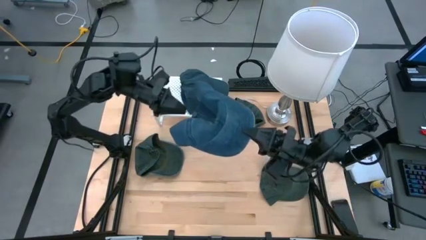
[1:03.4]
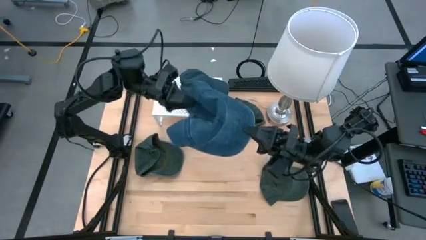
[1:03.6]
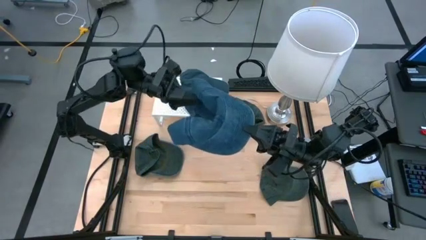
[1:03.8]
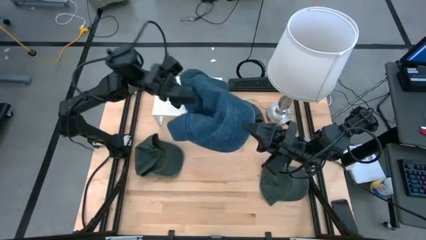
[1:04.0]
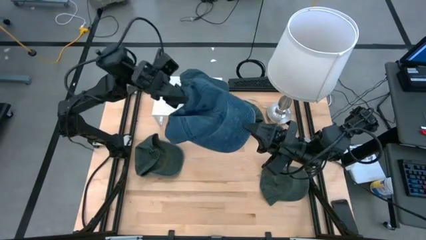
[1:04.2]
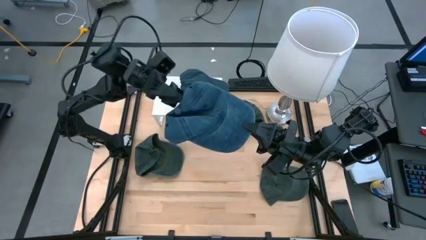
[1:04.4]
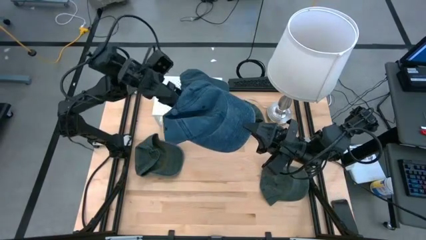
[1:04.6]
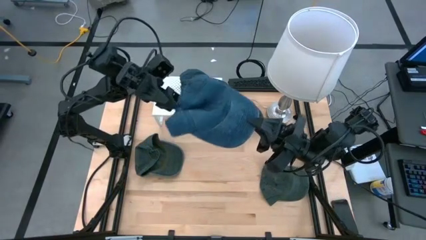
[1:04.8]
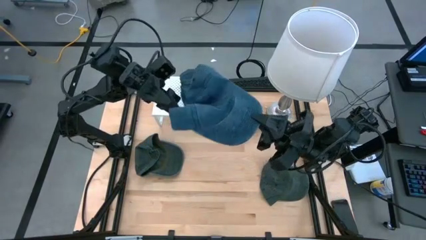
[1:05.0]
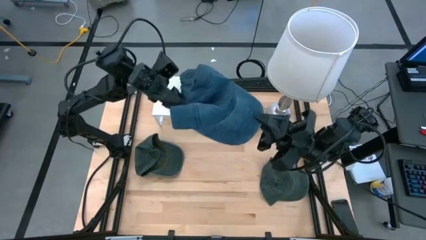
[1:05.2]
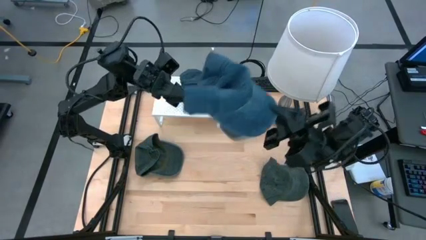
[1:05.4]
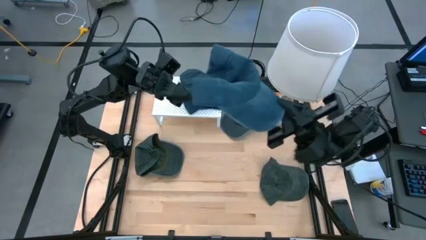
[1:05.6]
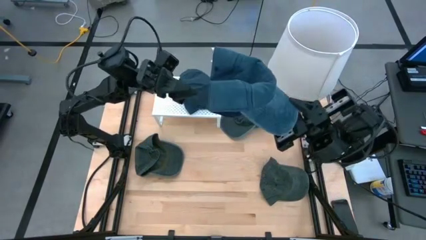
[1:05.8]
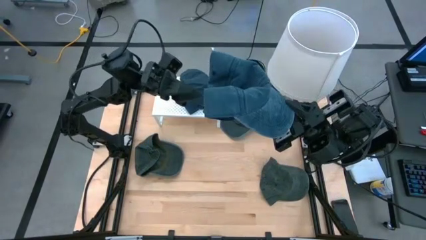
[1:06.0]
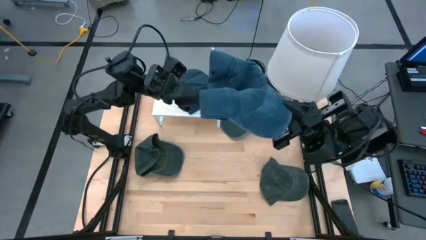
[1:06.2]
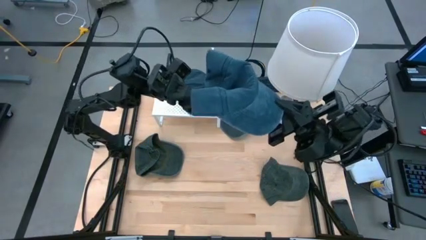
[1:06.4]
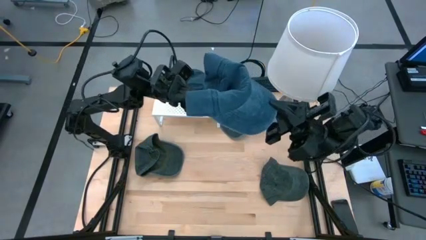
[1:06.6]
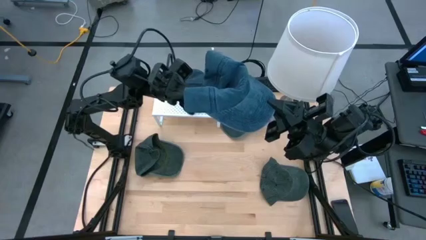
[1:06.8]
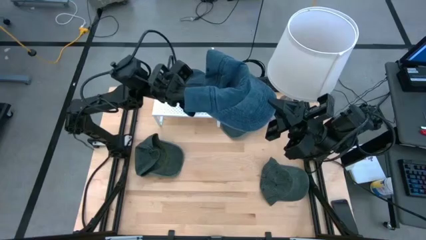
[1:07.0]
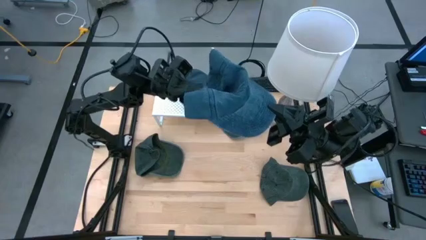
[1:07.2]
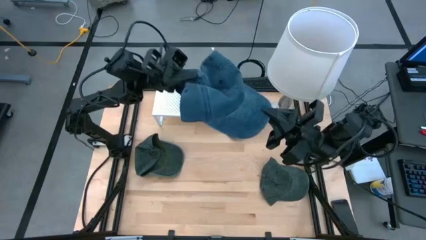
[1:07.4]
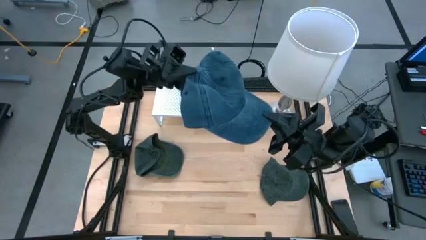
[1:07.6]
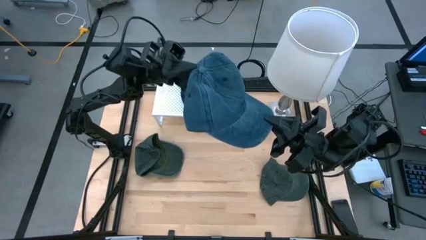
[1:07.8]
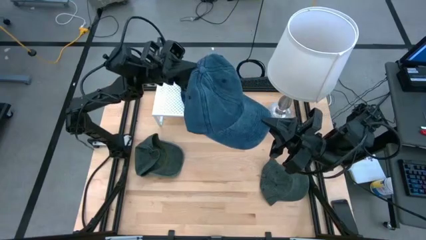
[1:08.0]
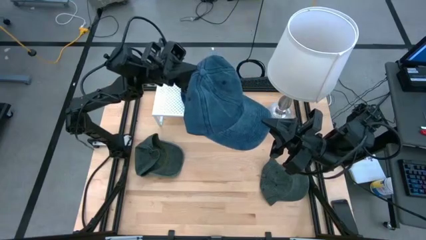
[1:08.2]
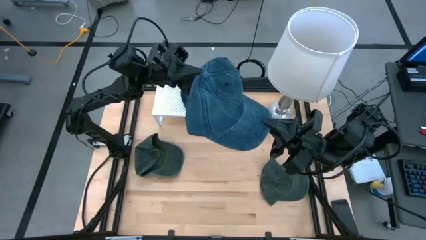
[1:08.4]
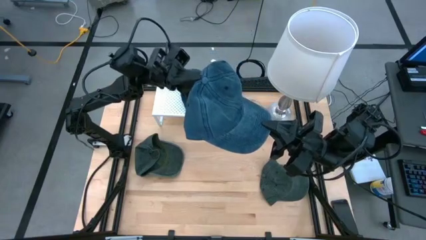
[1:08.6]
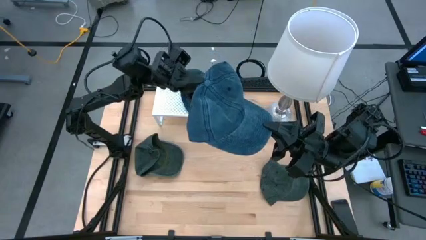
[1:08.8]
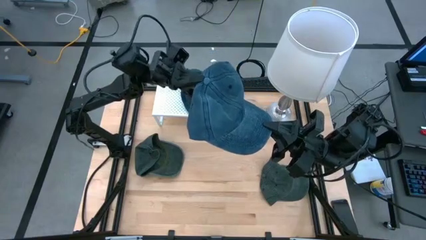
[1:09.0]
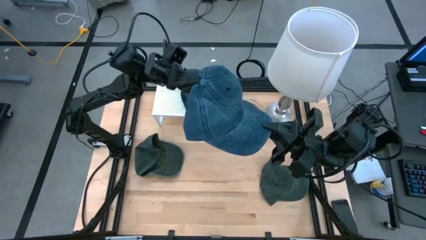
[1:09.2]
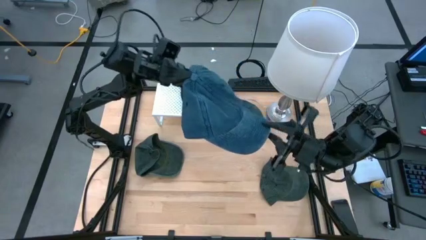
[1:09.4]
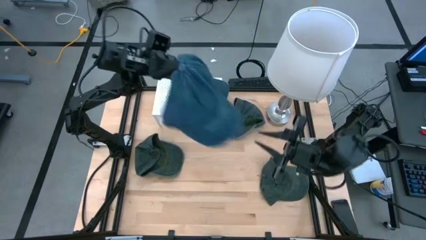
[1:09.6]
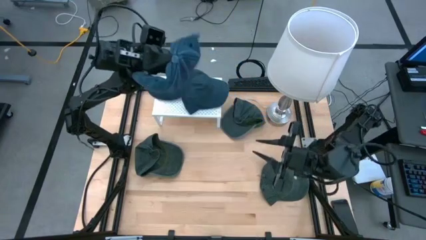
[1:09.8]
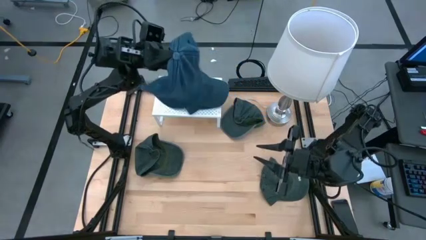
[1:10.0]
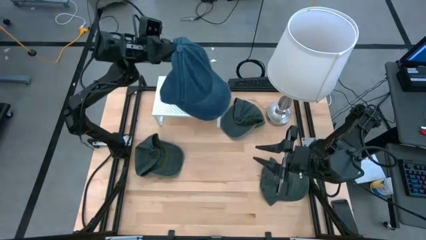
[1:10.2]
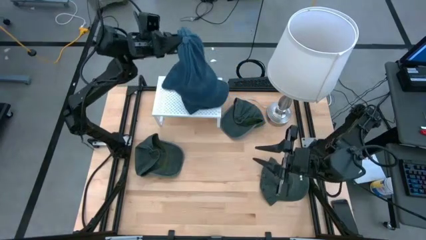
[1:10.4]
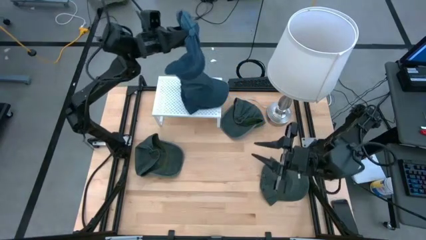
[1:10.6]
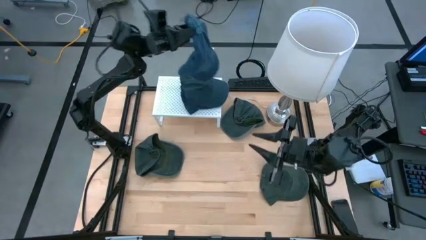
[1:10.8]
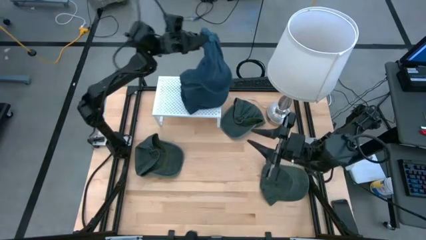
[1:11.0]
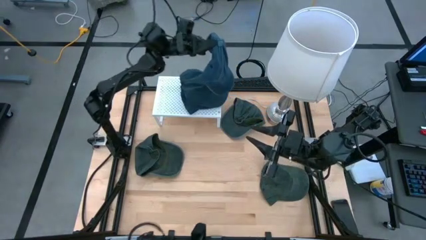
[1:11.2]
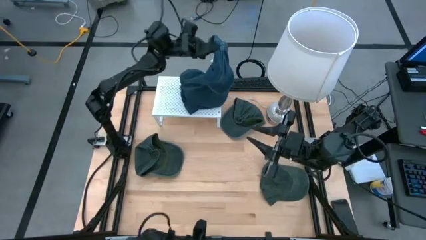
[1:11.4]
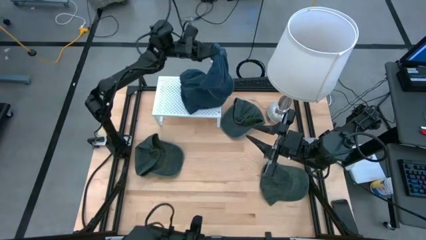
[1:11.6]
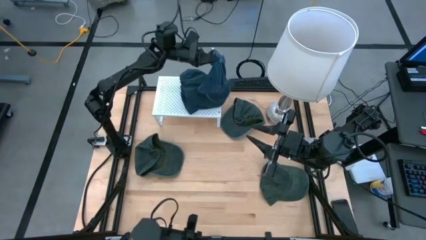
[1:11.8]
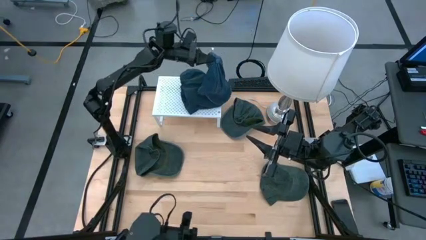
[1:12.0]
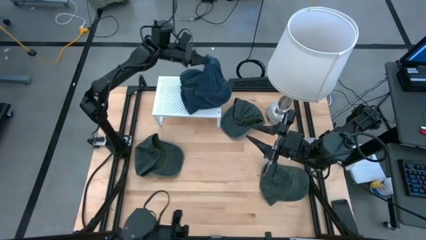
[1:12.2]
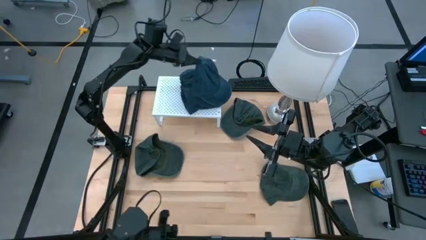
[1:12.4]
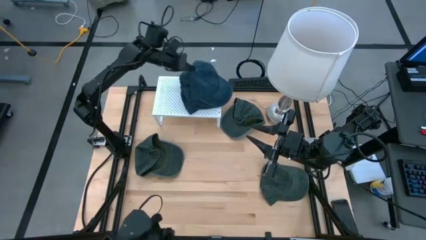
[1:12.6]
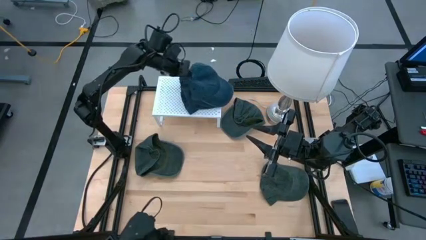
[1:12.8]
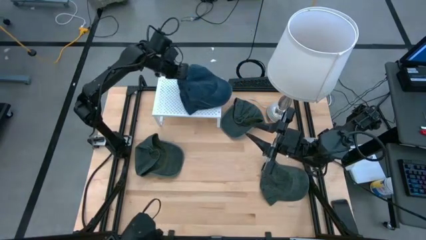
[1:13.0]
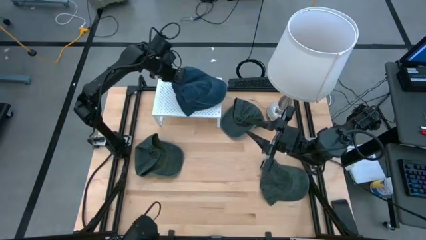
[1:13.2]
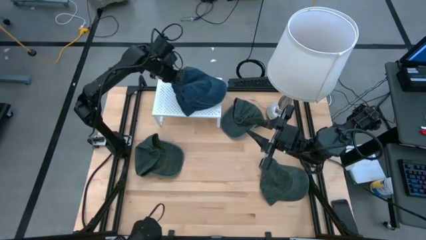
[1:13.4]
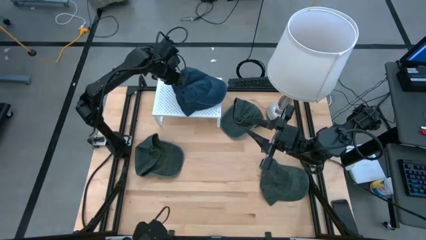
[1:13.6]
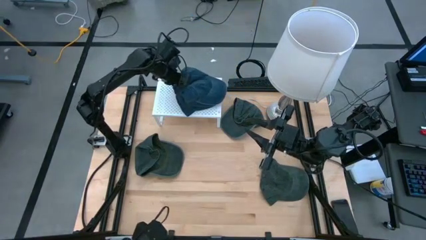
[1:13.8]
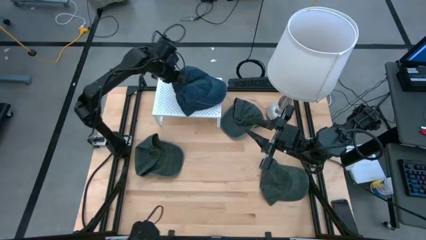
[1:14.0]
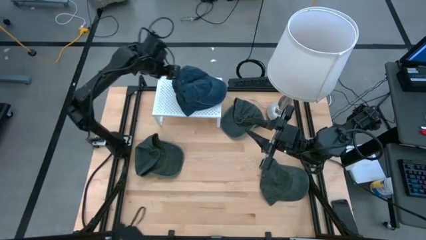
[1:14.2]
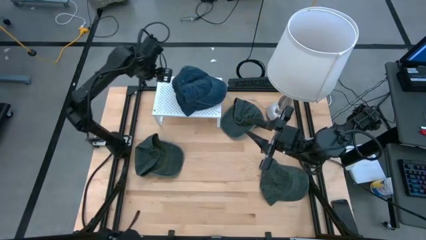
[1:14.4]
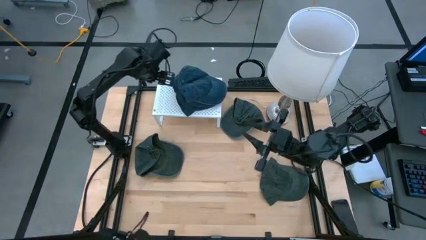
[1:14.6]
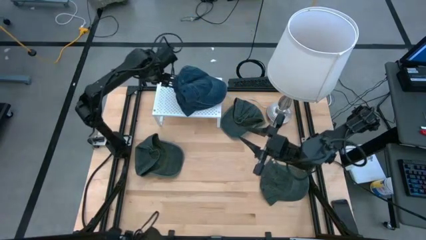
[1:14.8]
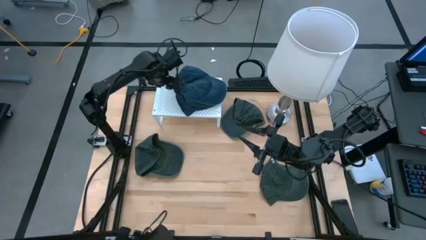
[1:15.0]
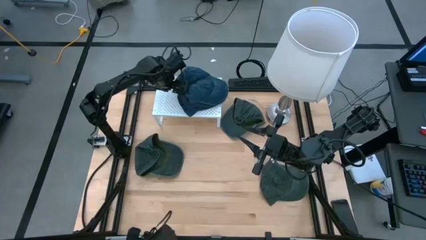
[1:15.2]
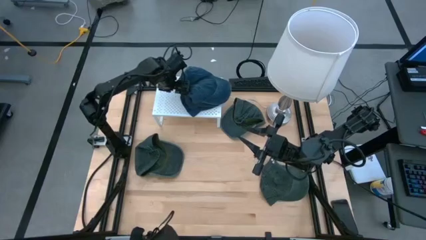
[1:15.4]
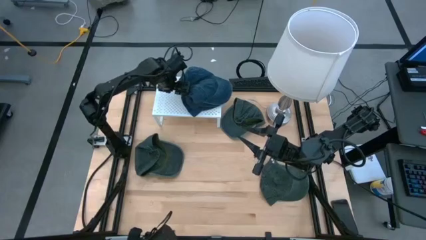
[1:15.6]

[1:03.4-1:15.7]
Task: Pick & Place hat
Stack the blue cap on the blue cap on the shelf
